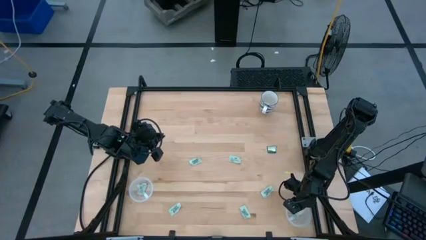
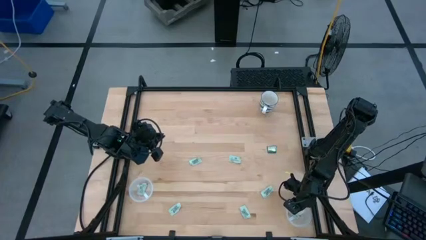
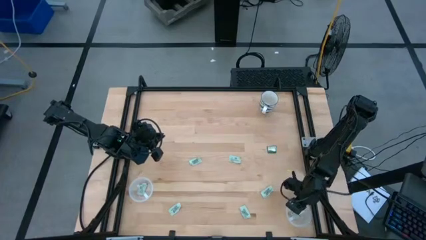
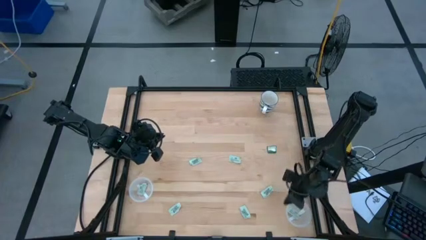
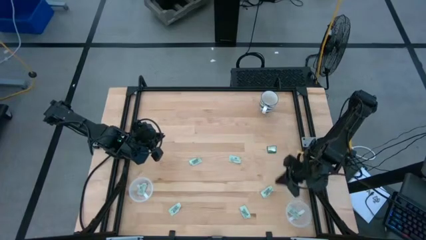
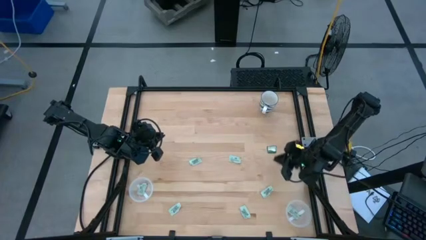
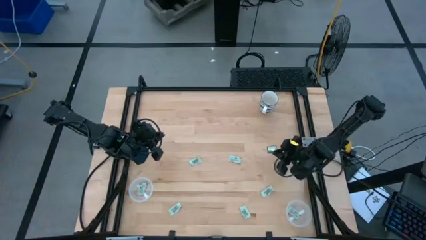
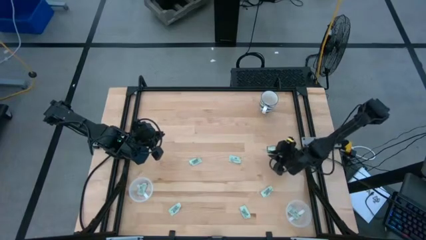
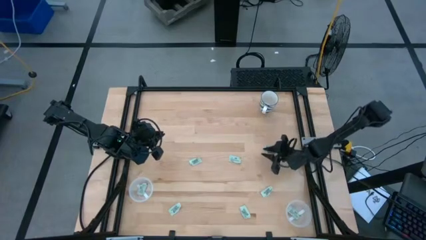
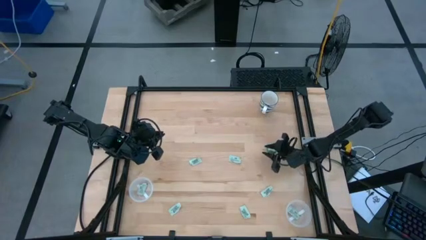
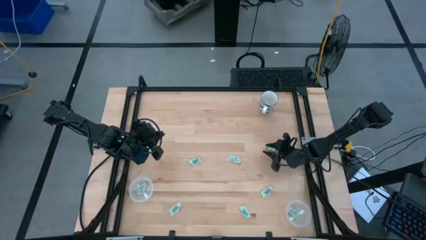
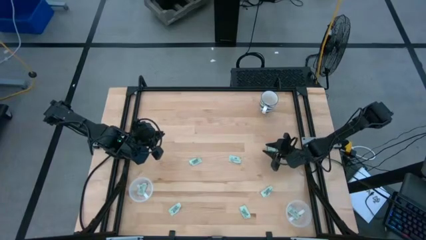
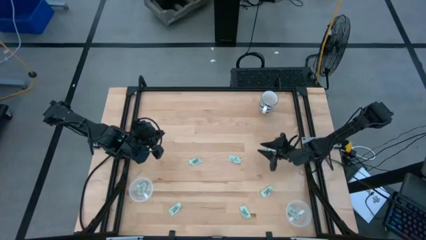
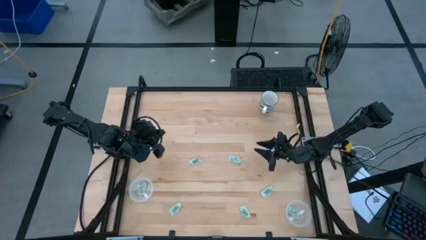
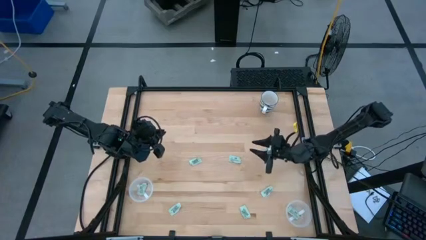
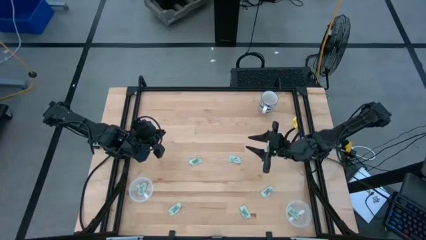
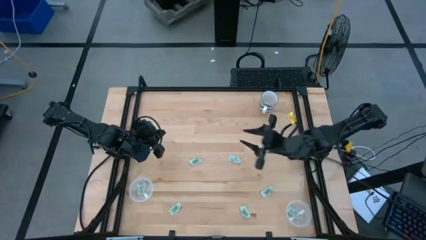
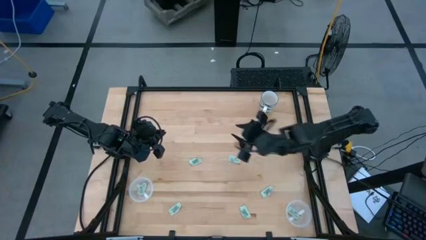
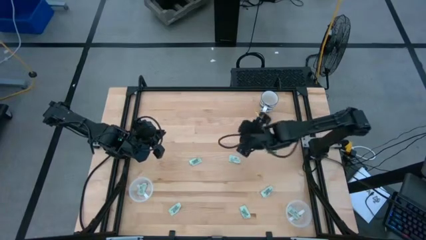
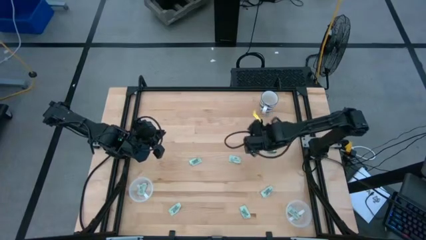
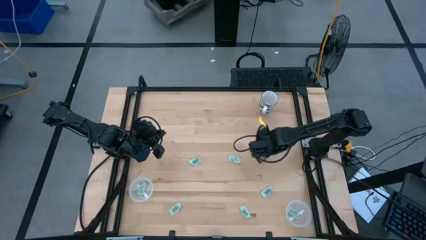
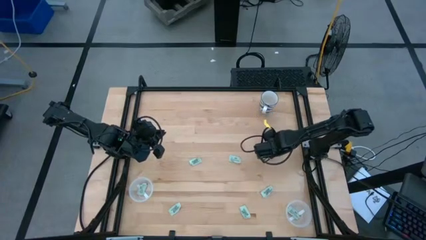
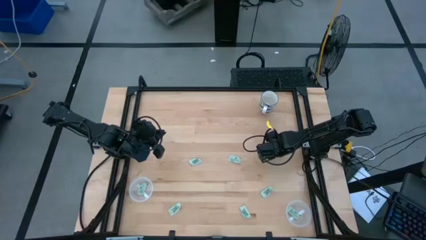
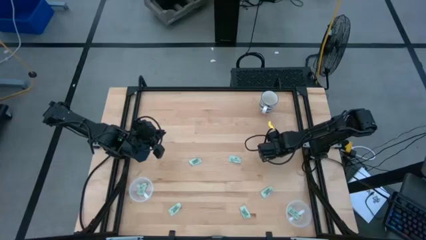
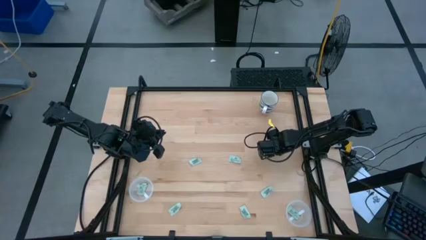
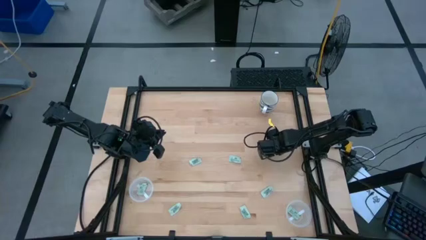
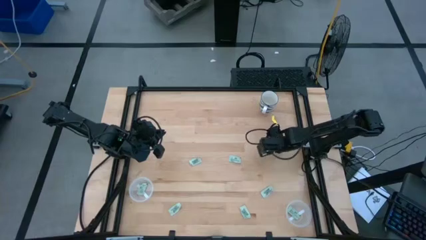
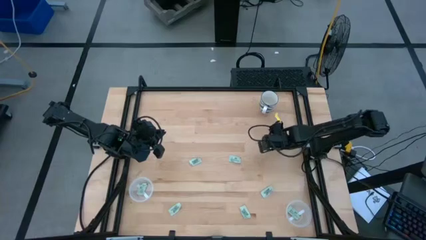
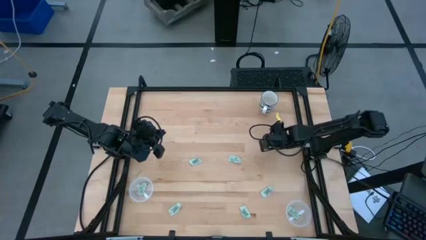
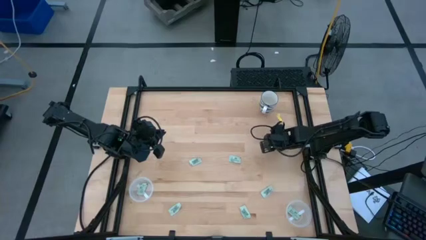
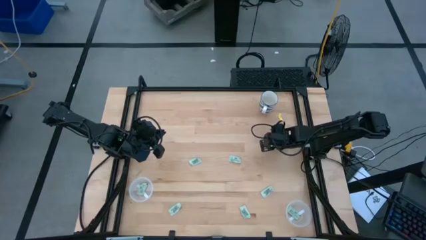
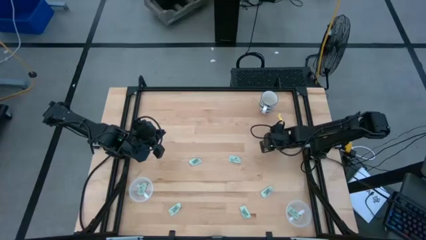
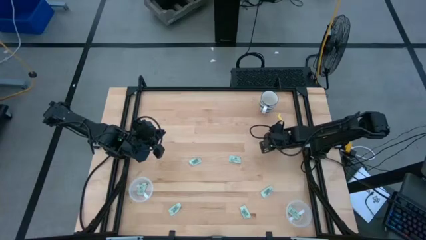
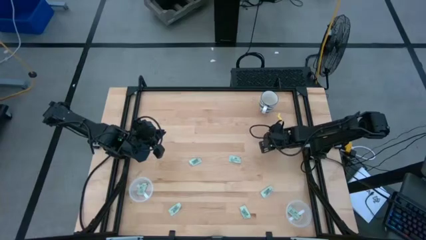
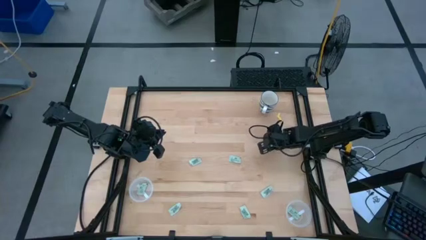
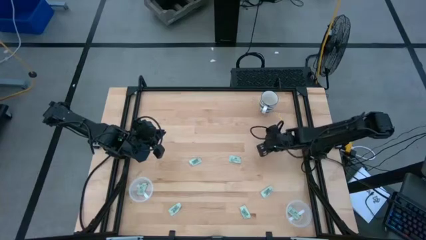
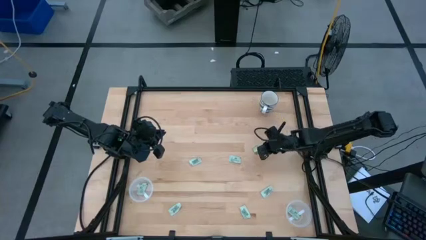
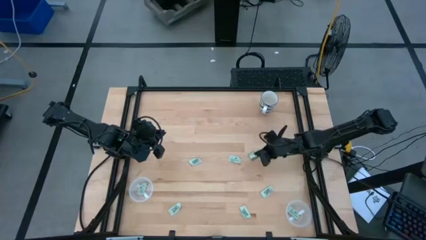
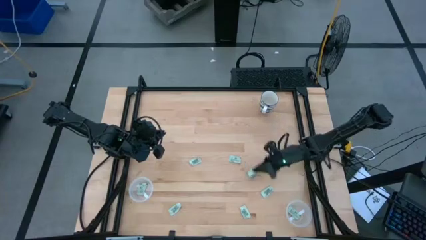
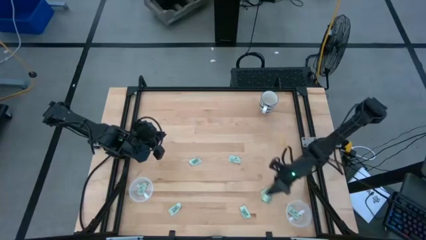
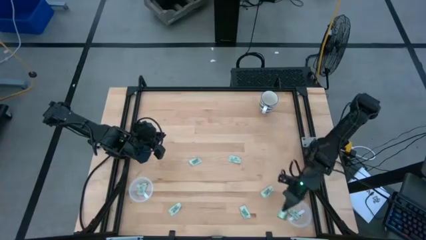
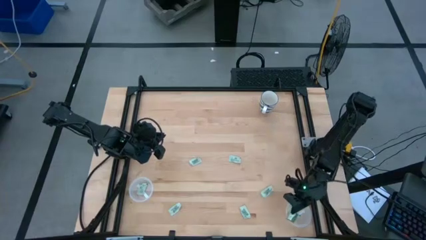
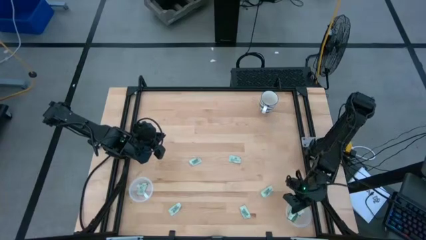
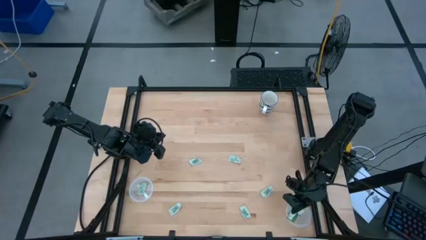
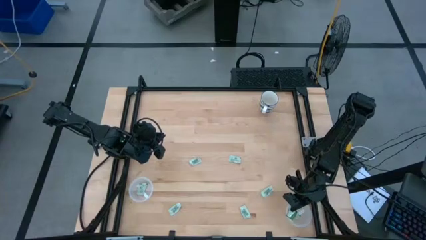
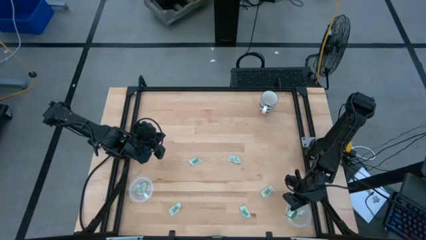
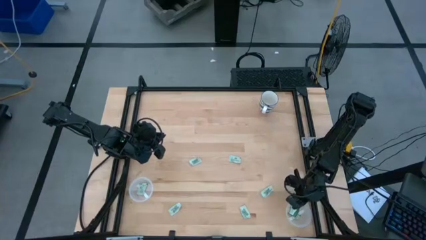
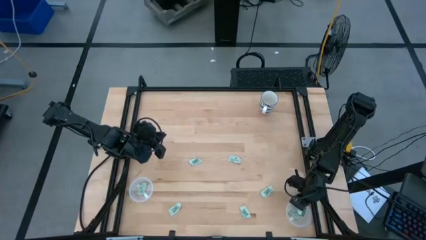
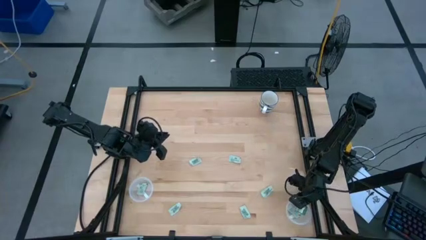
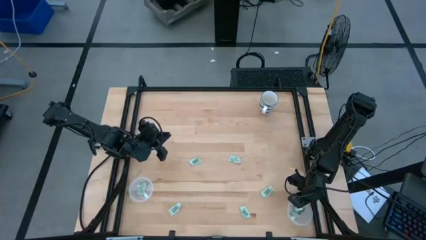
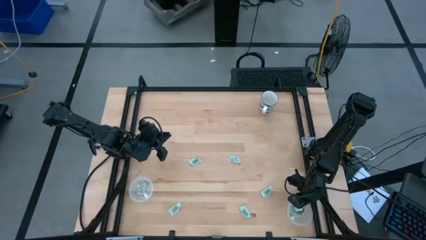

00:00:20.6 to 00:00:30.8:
Task: Pick and place Stevia / Truvia into bins
Put the truvia packet into the bottom transparent container

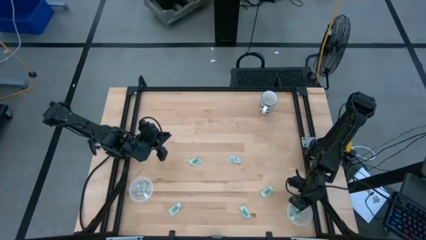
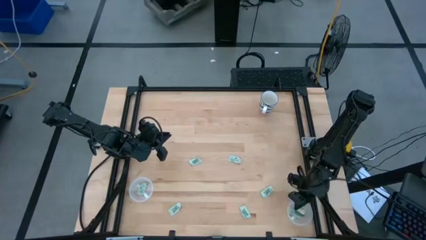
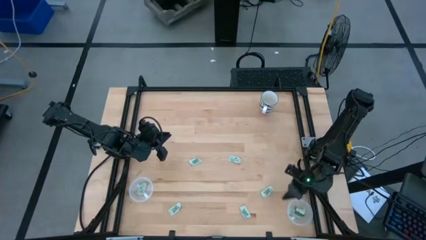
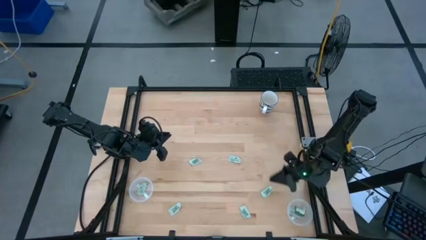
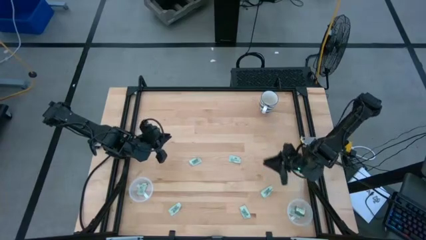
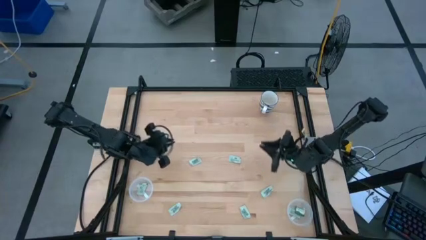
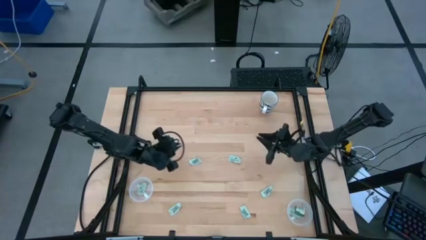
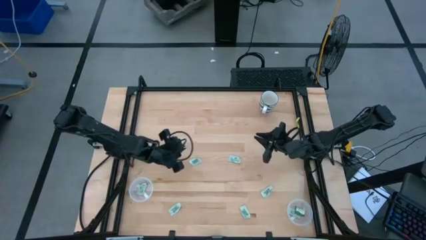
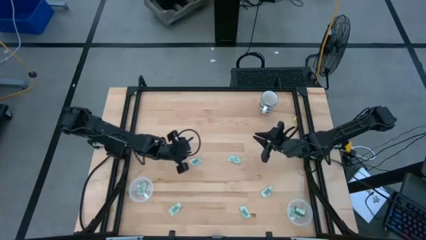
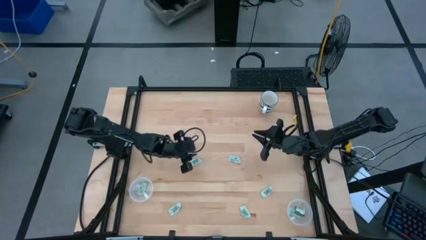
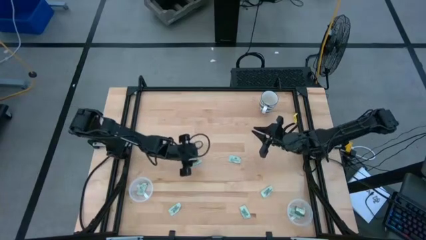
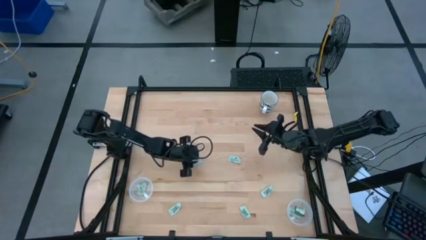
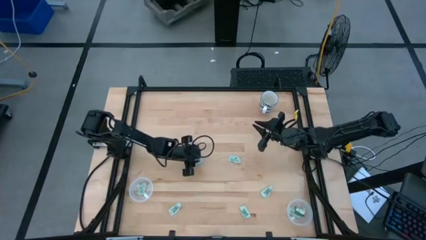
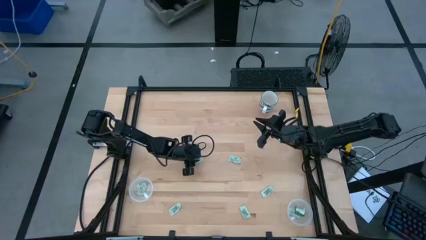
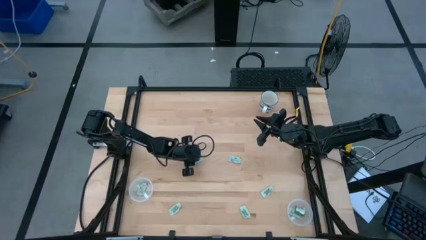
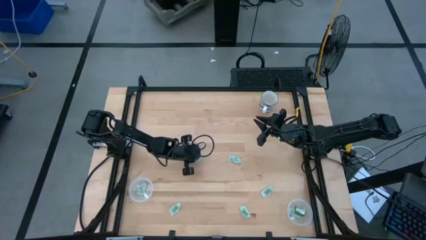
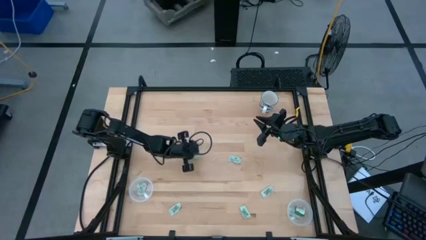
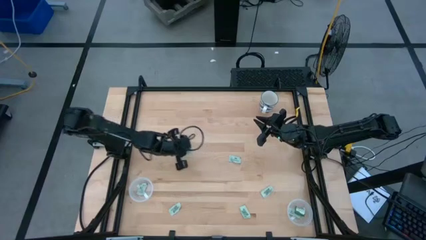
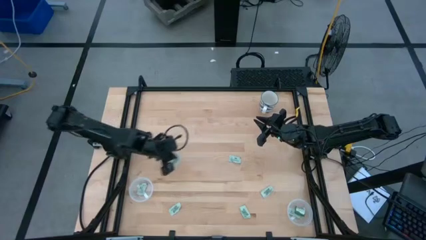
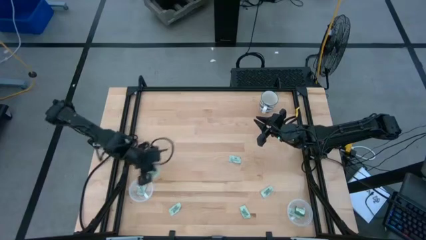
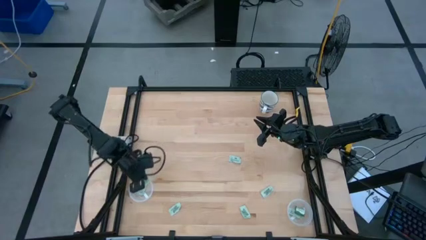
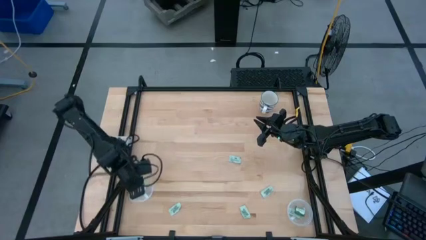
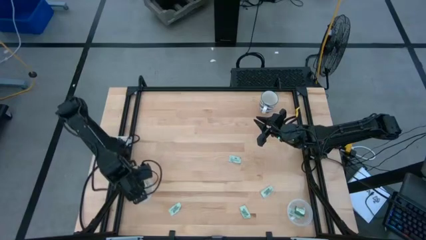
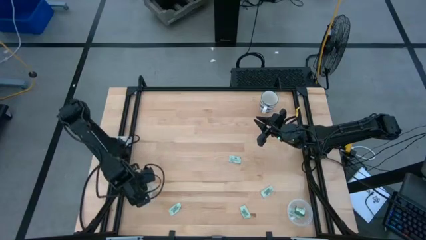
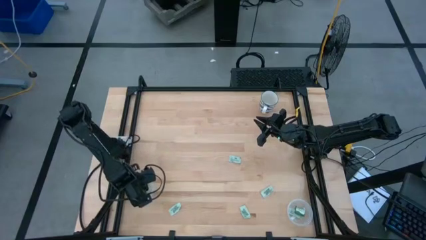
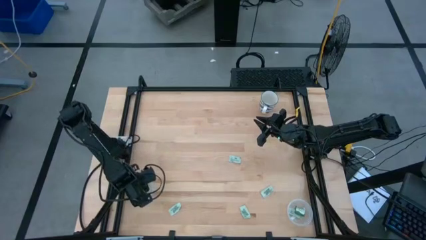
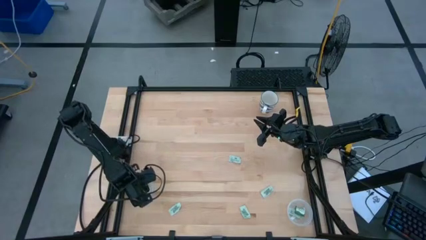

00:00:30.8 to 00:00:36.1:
Put the stevia packet into the top transparent container
